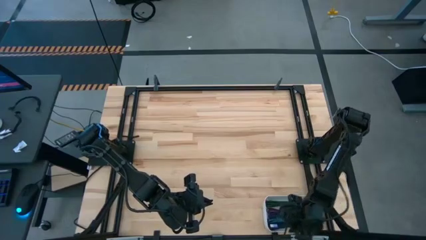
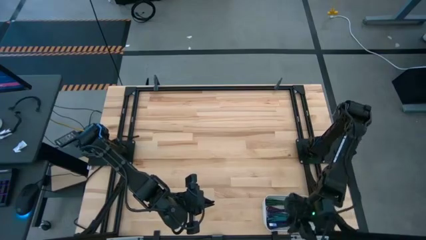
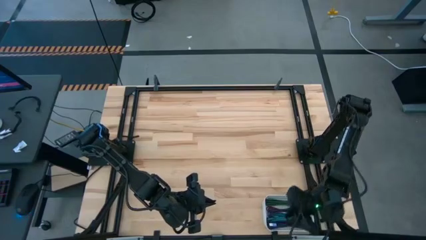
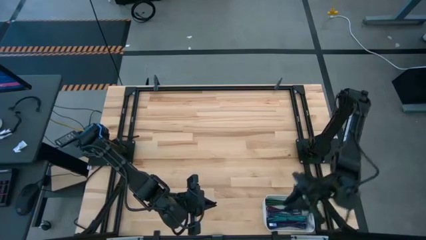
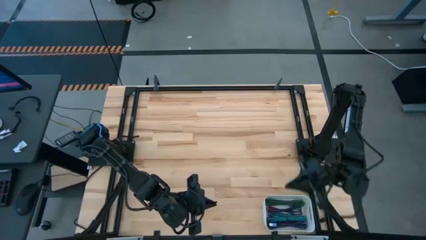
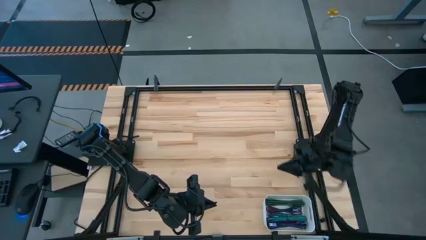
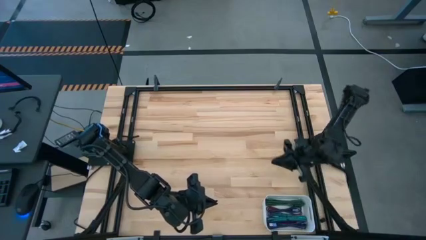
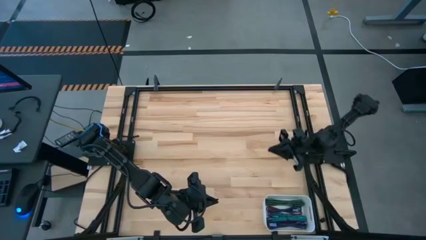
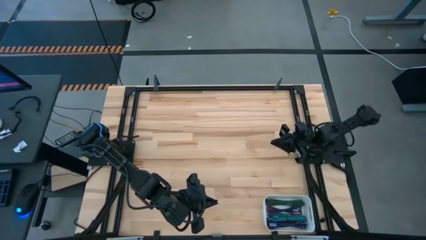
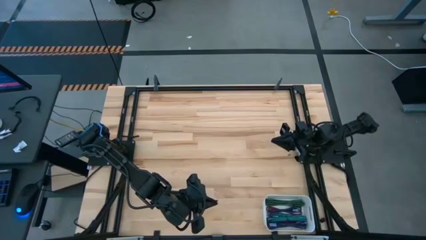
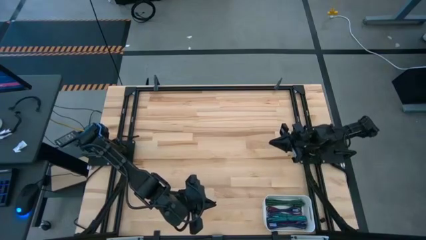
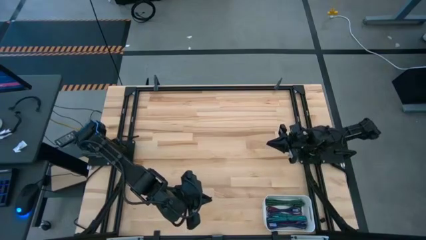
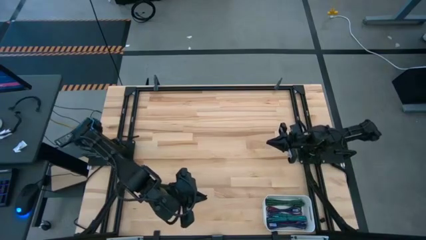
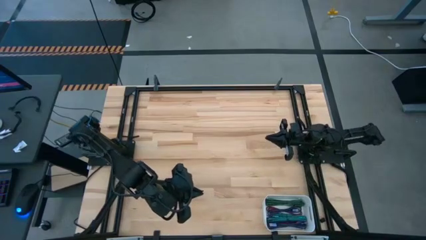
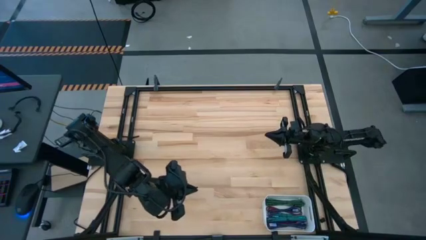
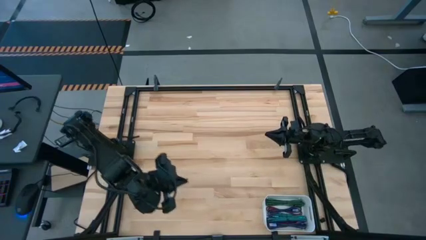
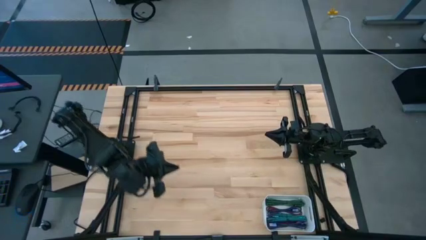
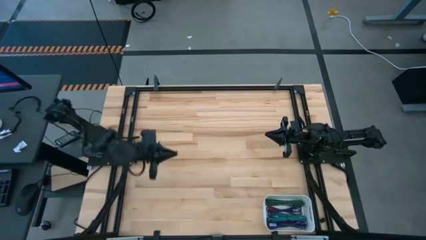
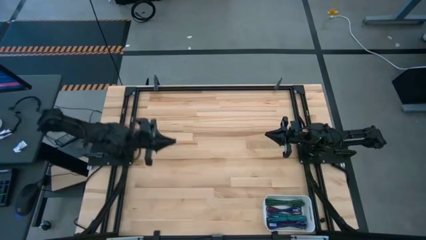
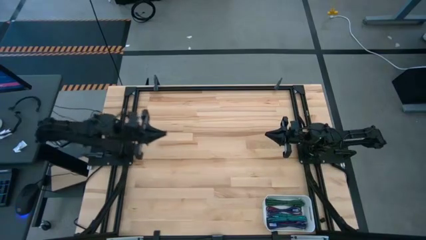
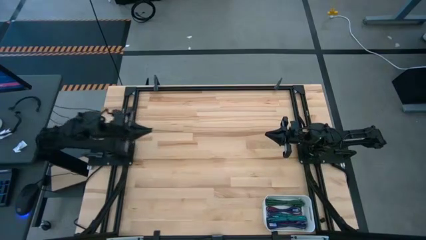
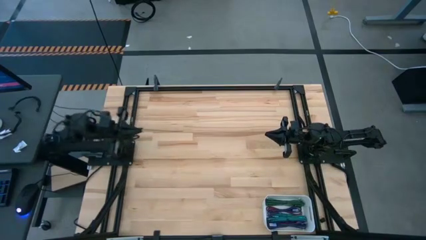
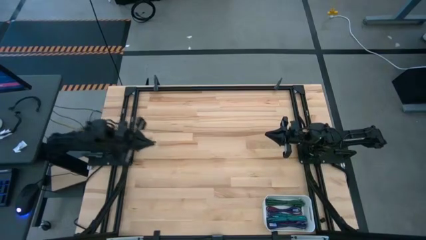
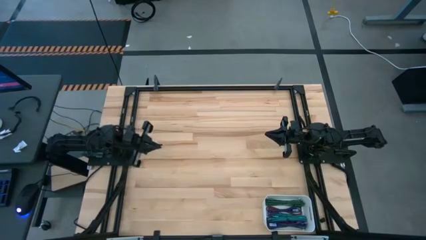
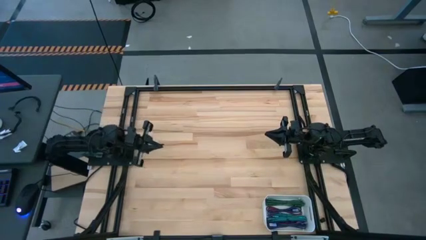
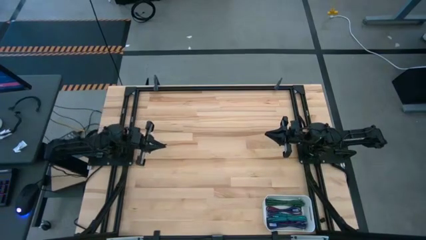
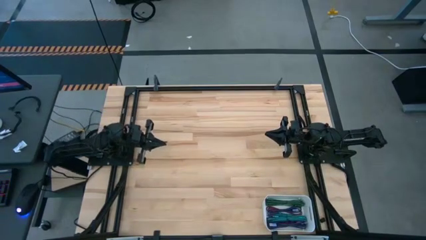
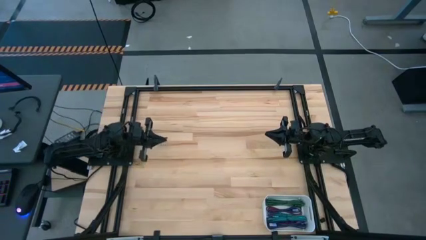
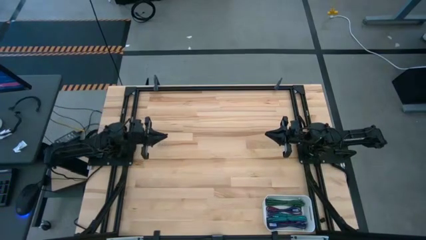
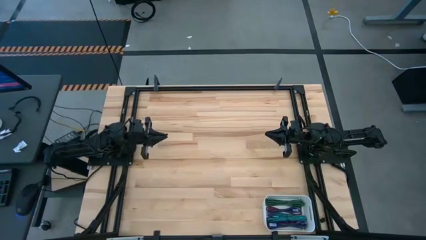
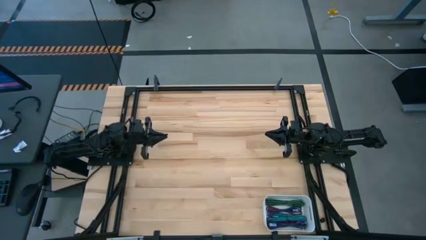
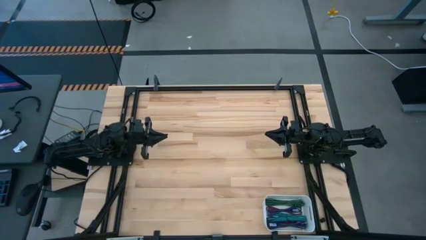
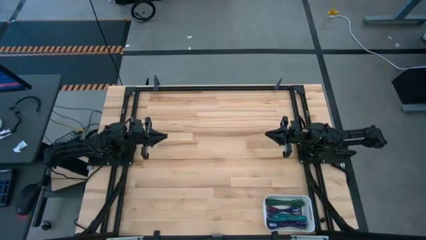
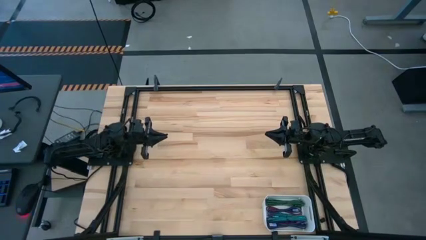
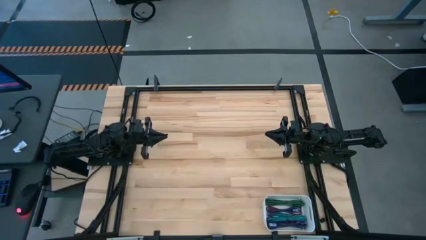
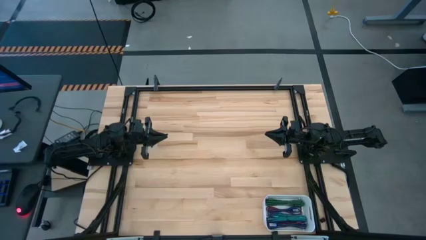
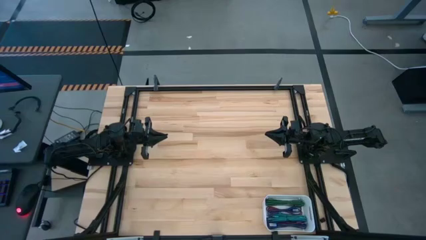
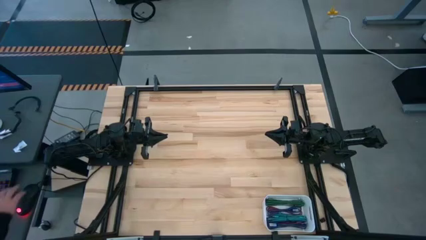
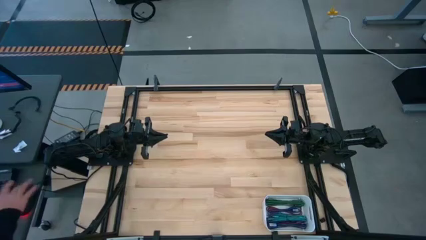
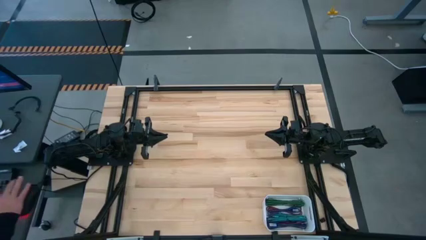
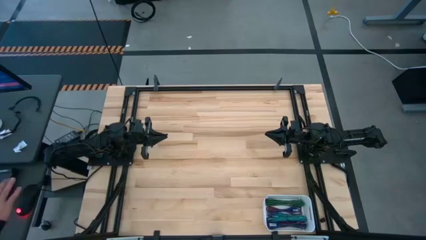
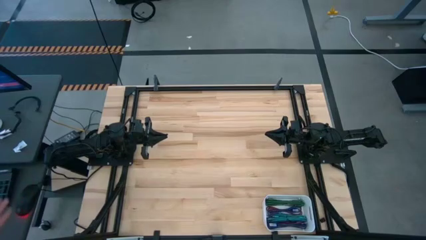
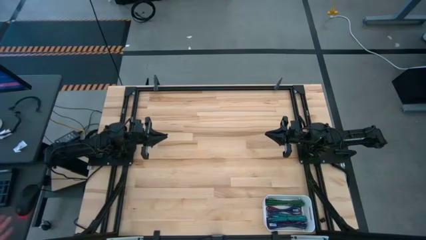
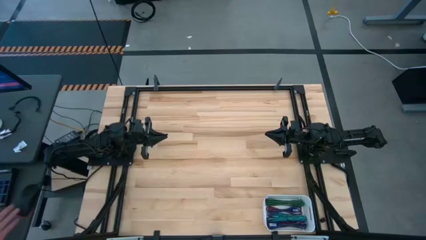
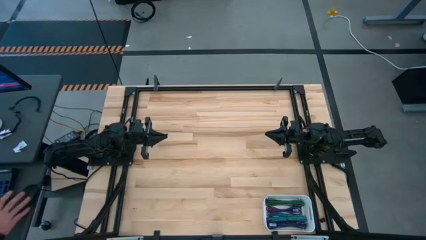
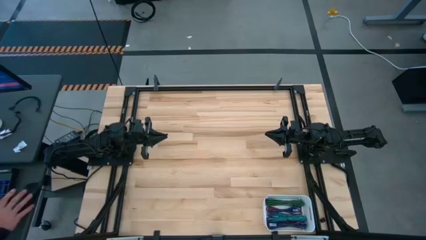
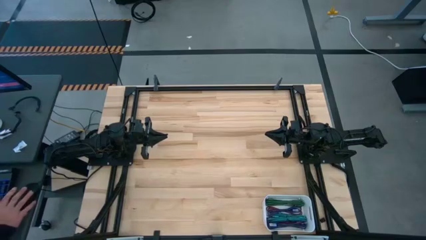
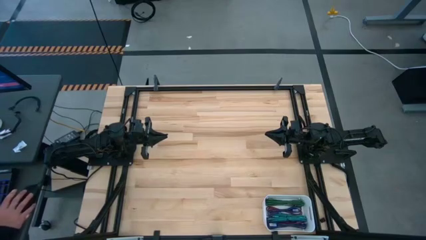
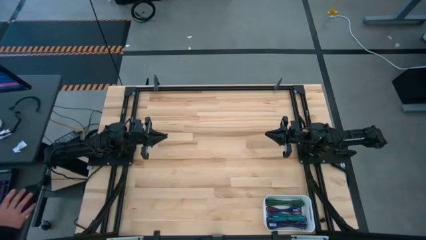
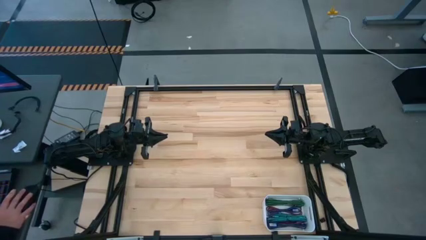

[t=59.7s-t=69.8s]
Task: Pick and place USB-C Cables
Return to Home Position

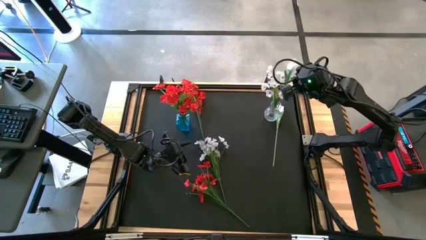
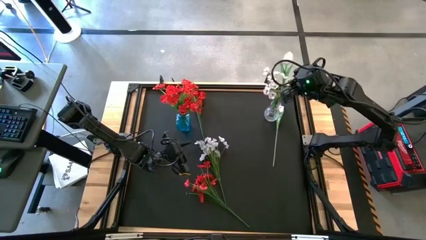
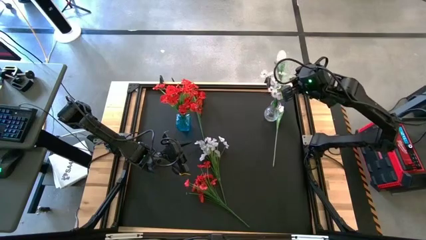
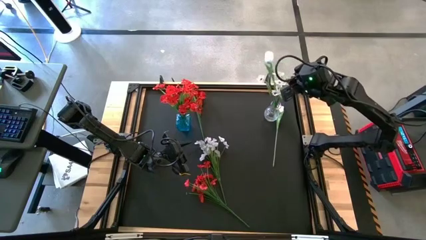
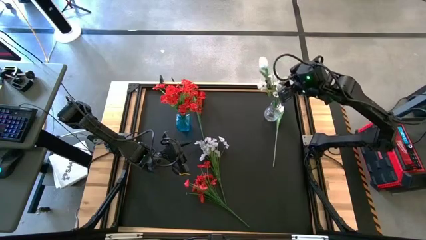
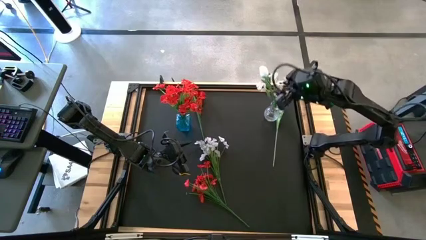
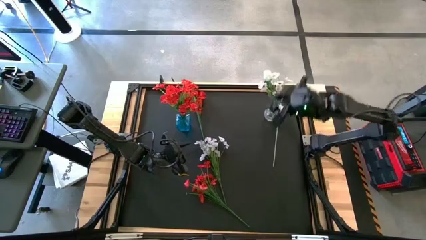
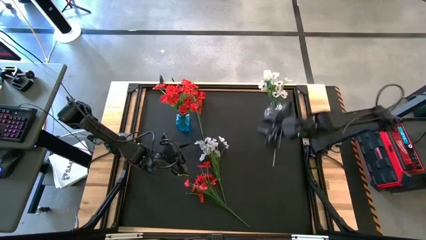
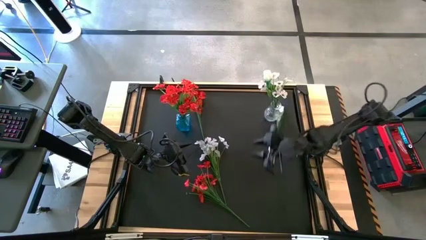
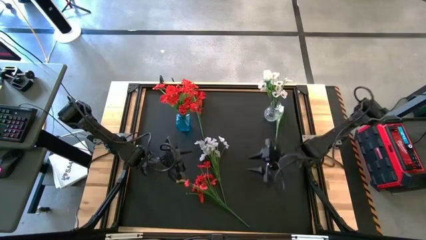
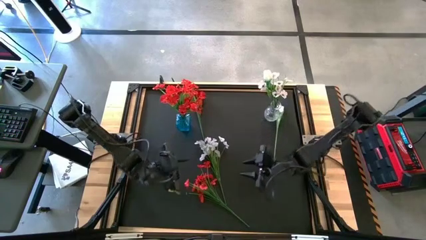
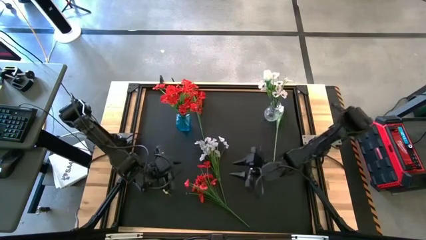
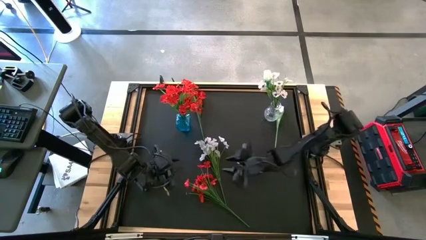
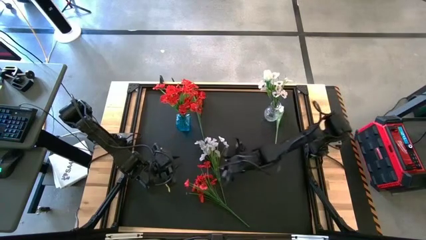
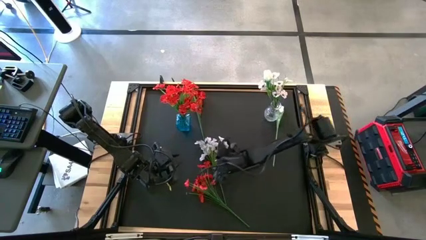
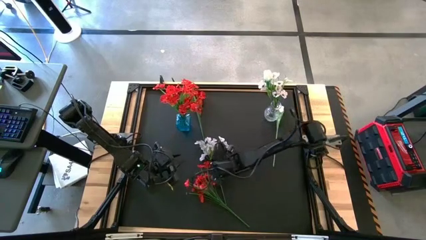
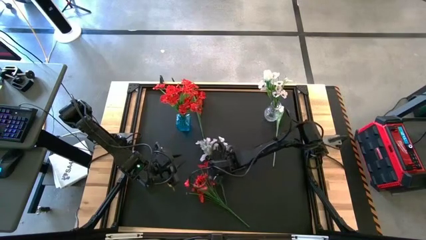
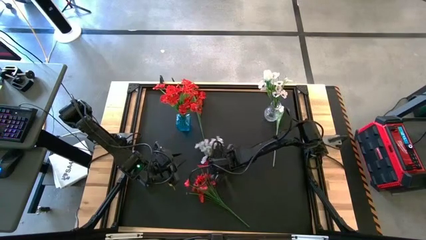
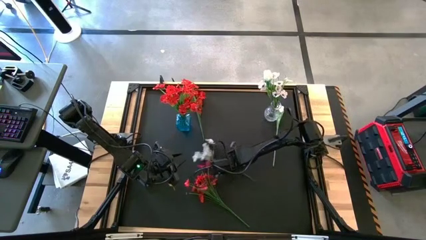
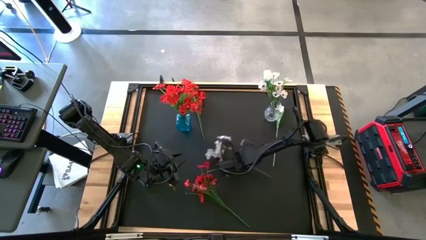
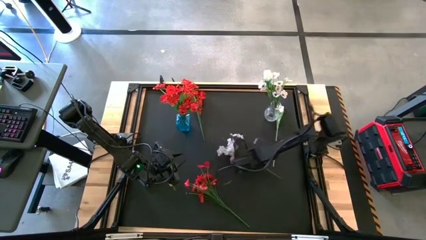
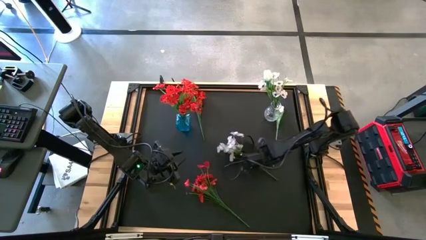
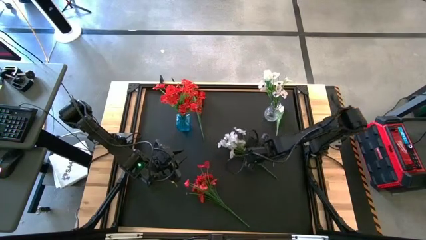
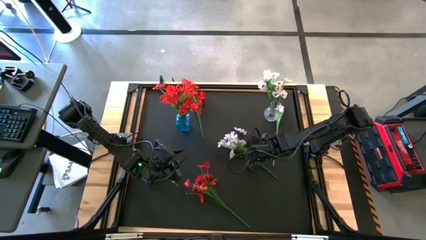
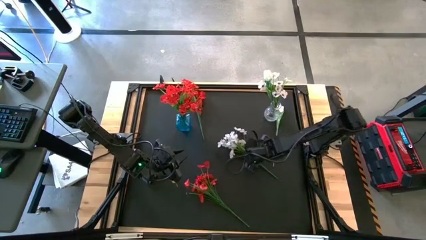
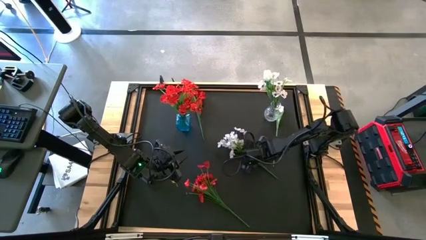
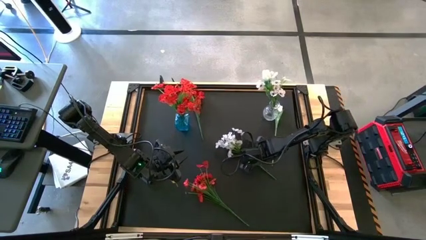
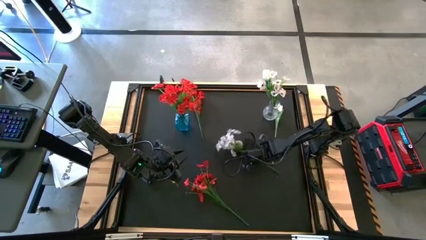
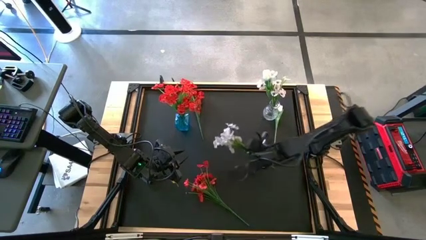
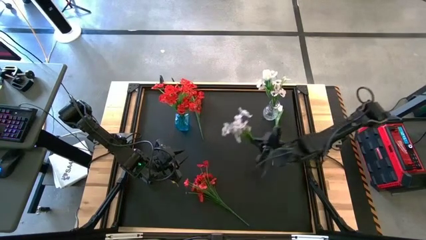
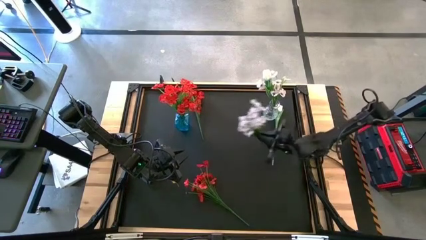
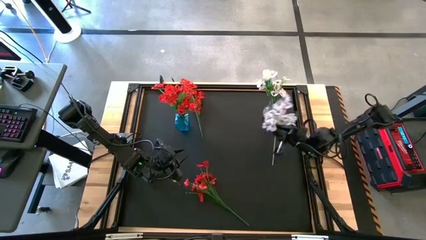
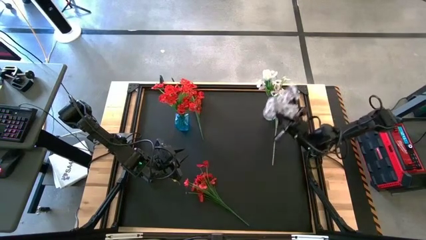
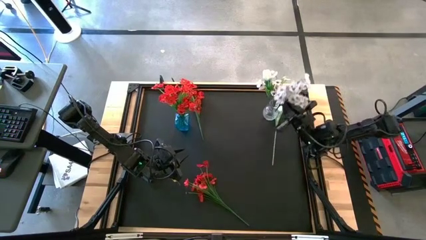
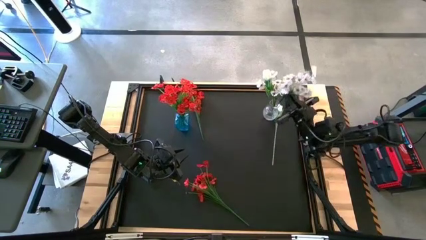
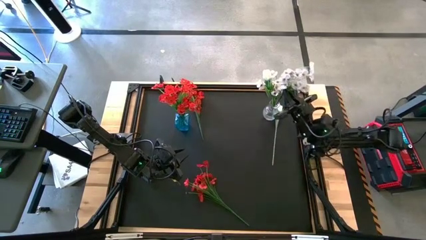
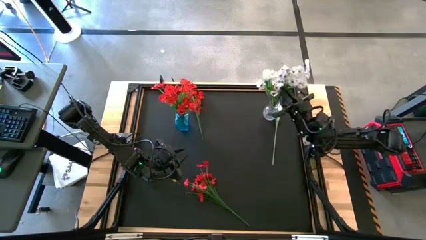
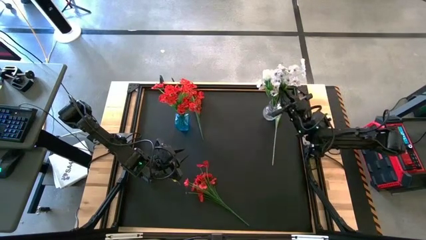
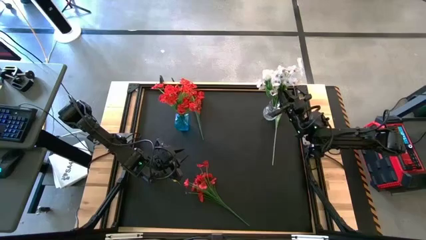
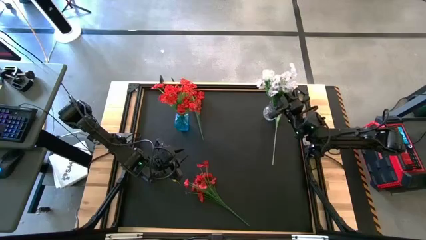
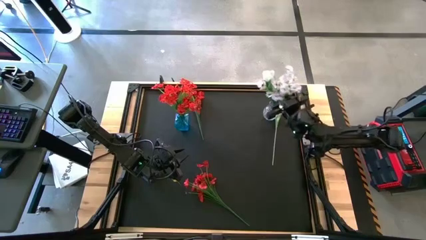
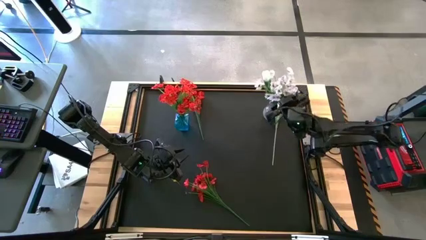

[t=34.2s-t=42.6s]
Task: Sort flowers into vase by color
Put the white flowers into the transparent vase
